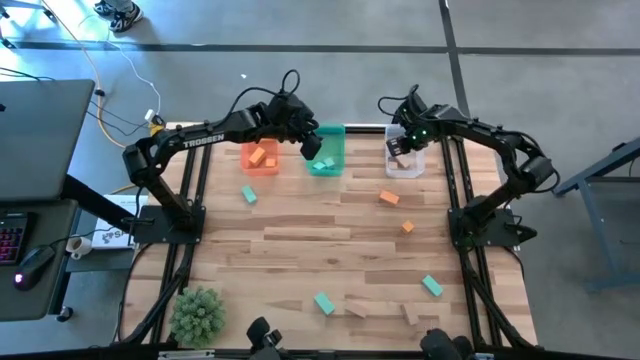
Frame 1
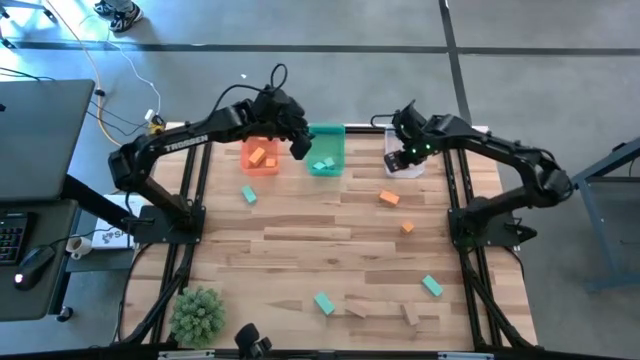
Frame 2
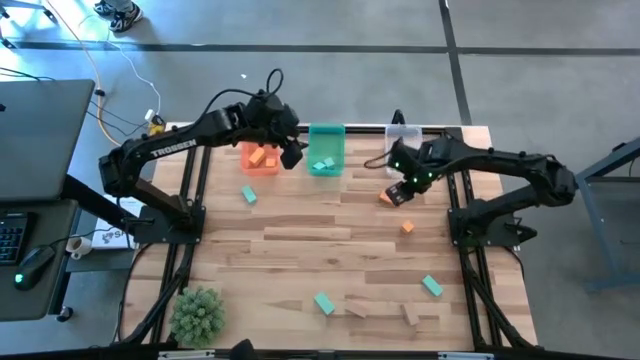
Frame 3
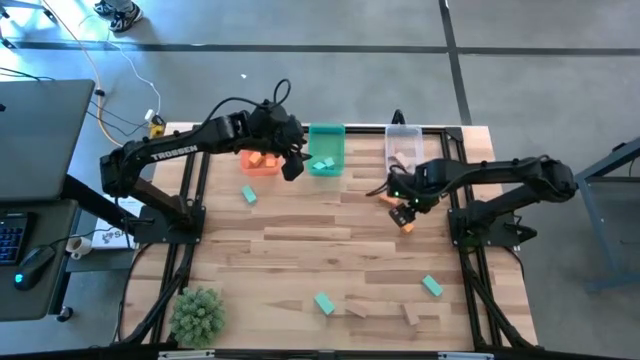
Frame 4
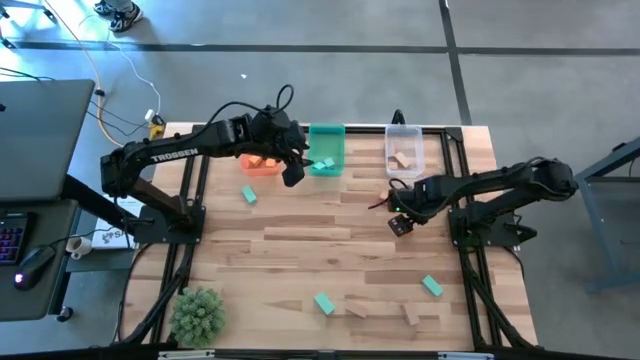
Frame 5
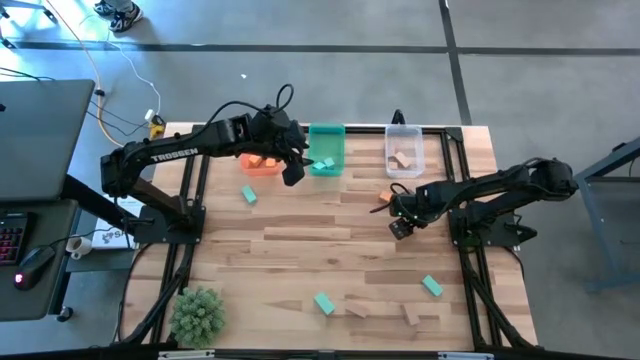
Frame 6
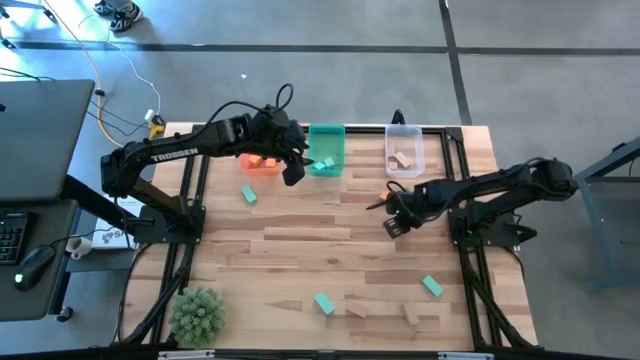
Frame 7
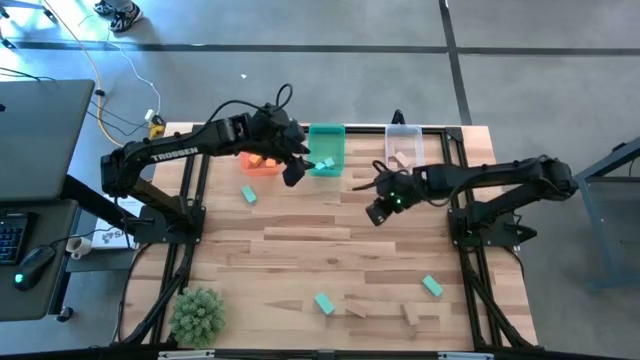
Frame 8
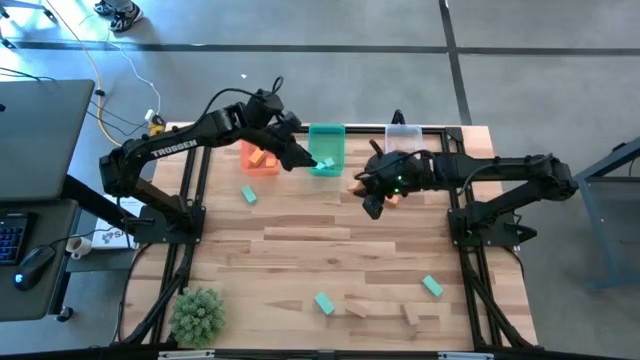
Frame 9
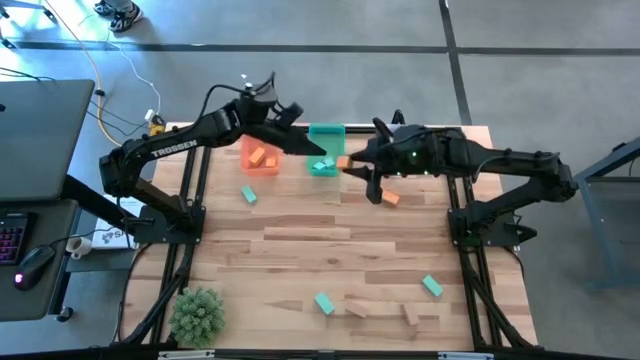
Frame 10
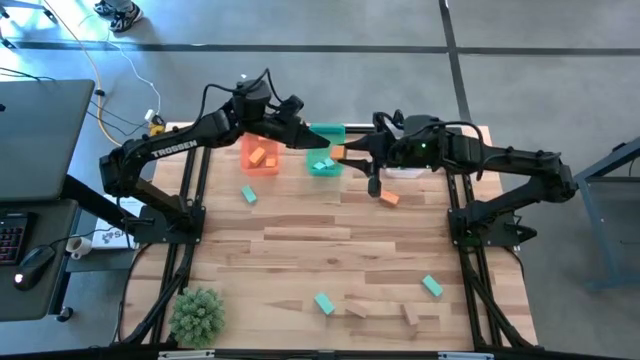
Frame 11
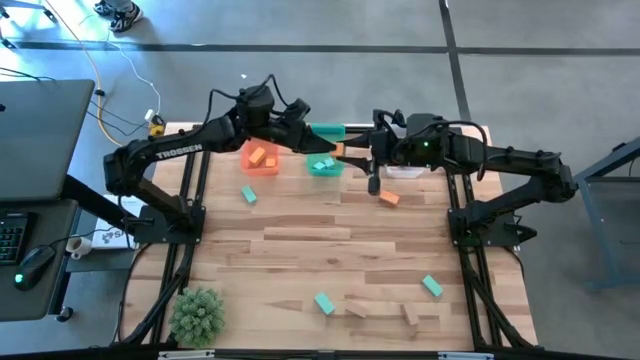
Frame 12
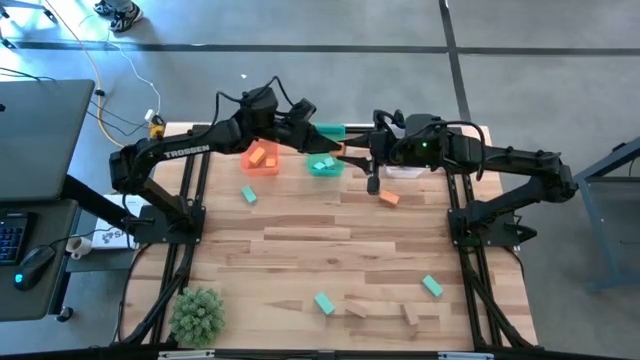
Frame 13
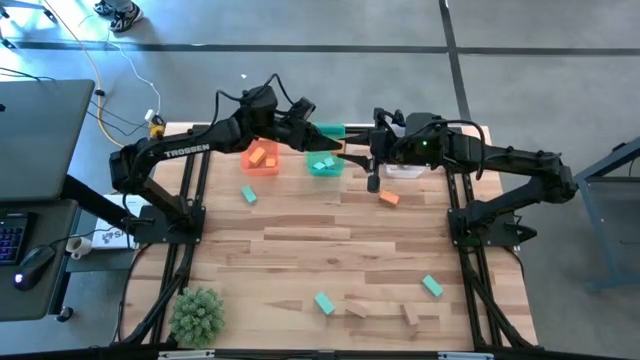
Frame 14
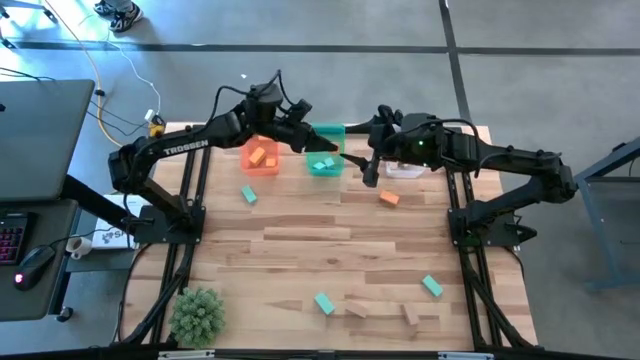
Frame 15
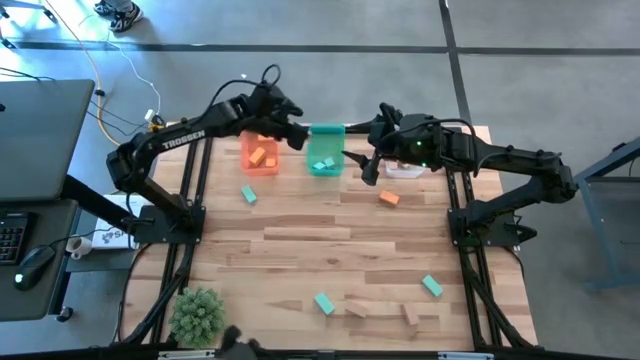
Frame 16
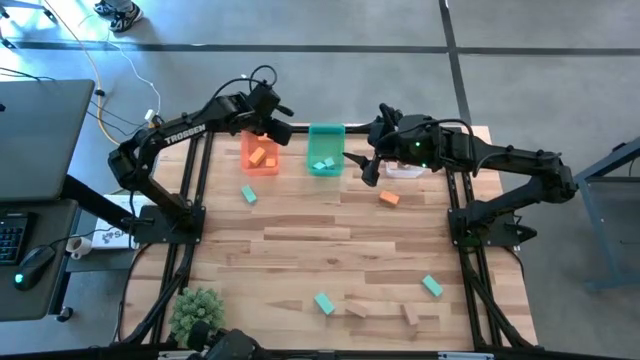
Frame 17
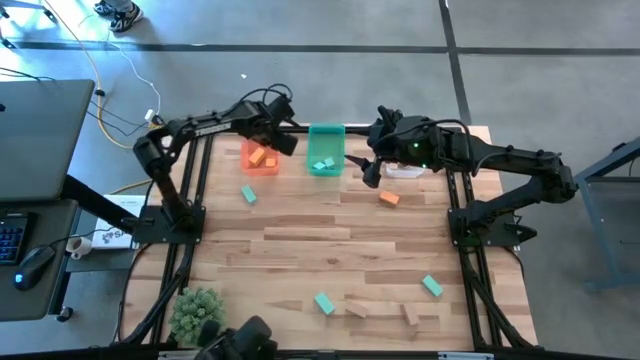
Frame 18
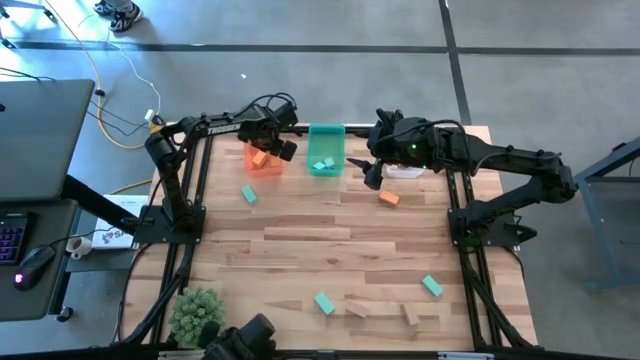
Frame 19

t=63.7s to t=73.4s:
Task: Sort & place blocks by color
Put the orange block into the orange bin

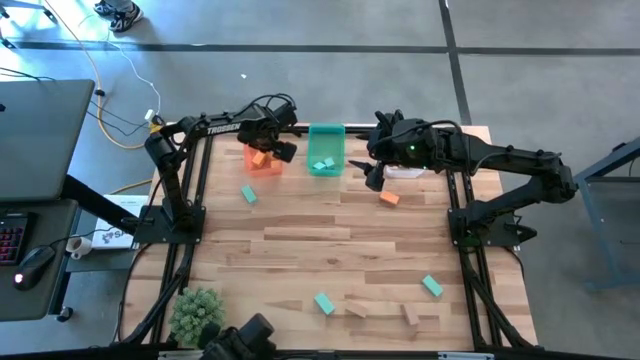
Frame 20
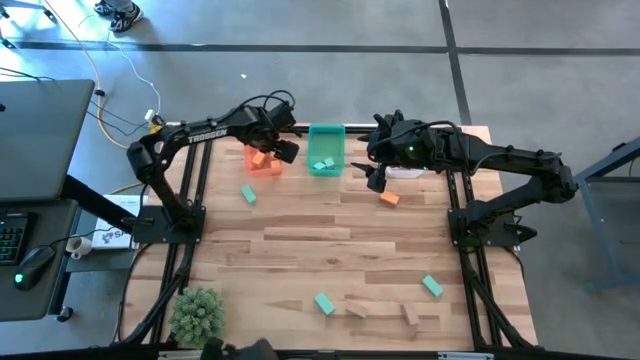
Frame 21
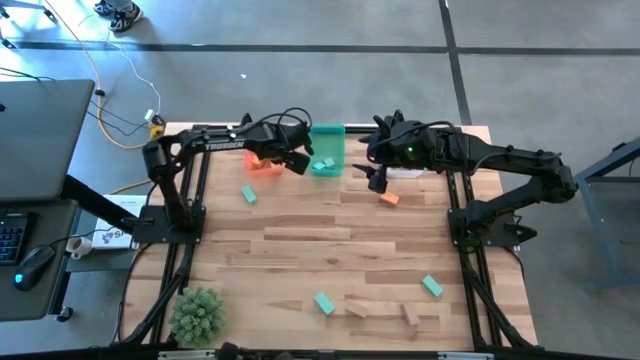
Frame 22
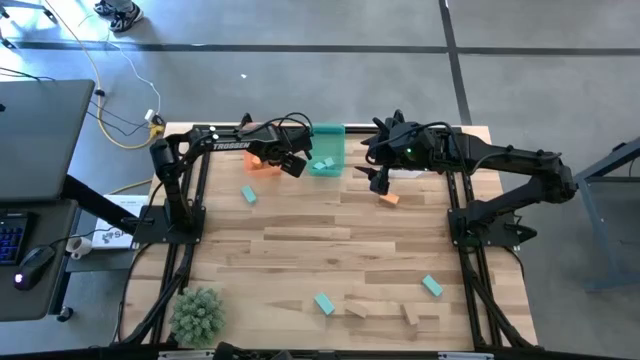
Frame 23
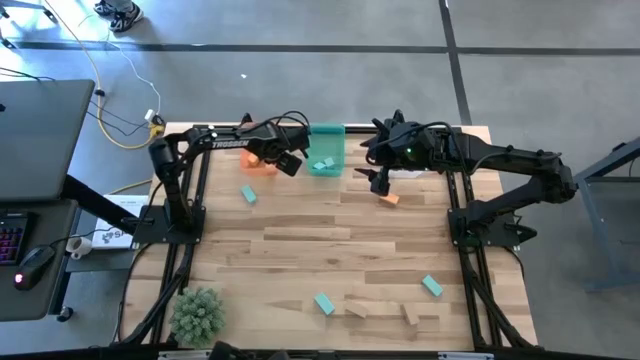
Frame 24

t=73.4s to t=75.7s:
Adjust the orange bin

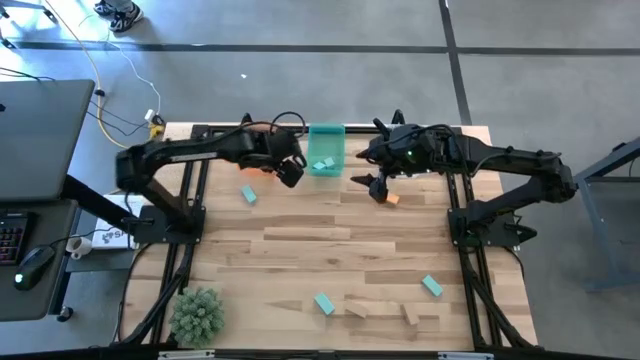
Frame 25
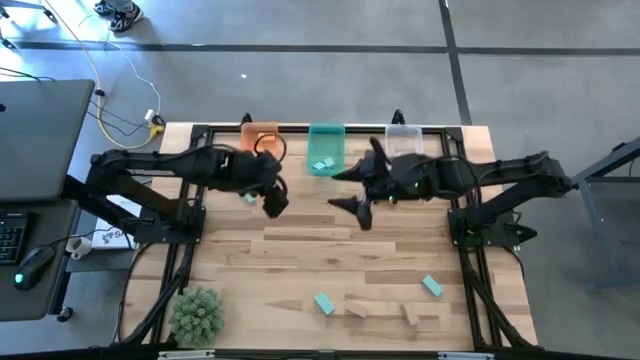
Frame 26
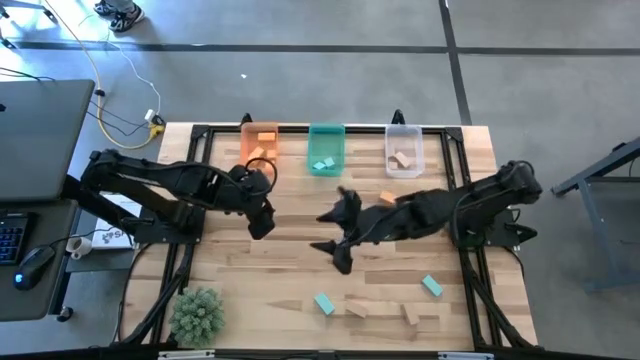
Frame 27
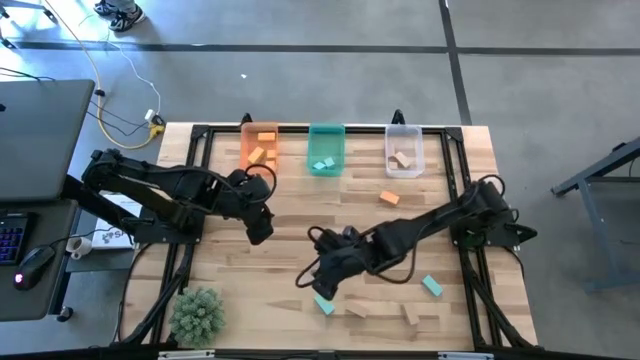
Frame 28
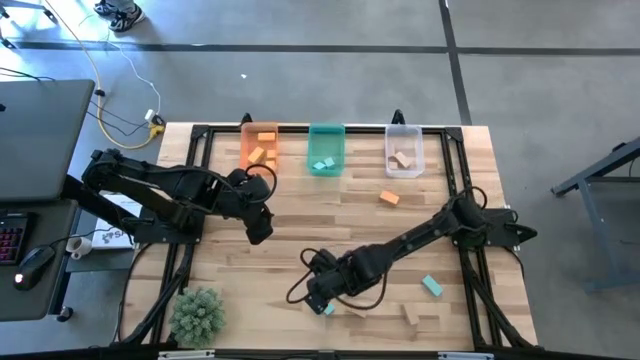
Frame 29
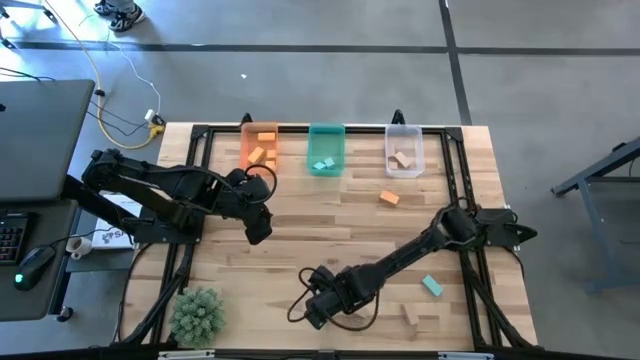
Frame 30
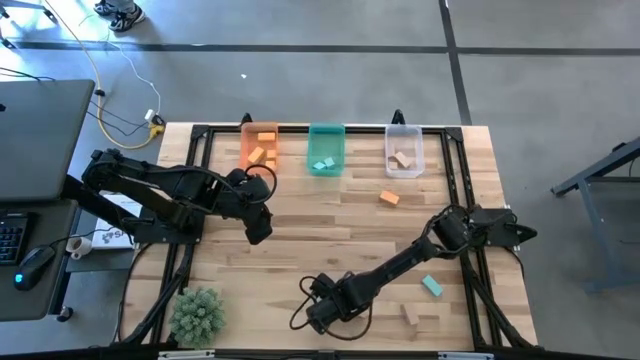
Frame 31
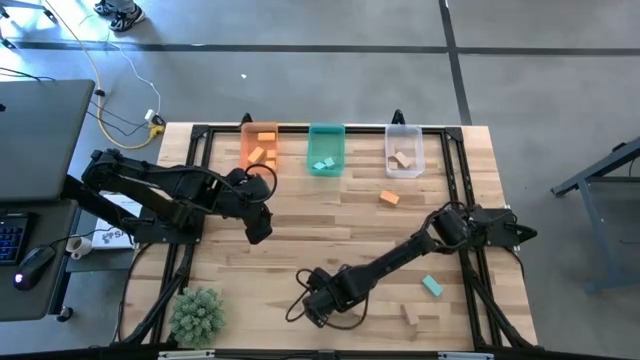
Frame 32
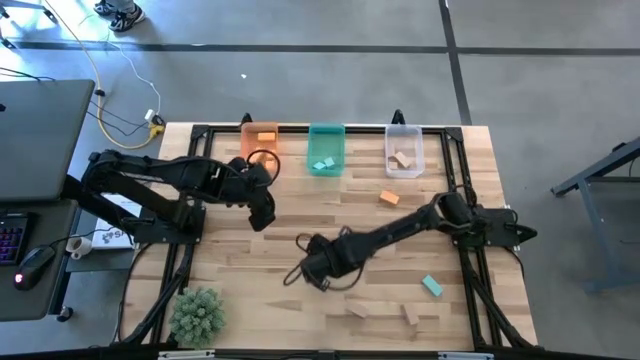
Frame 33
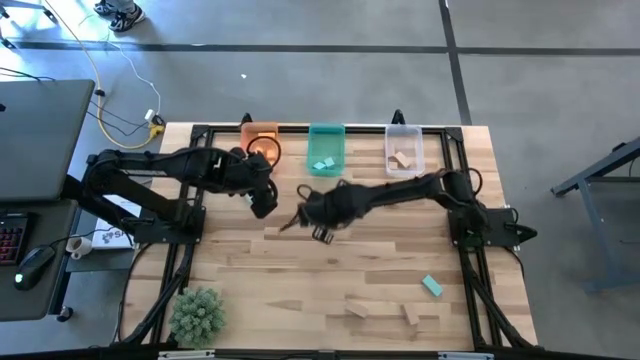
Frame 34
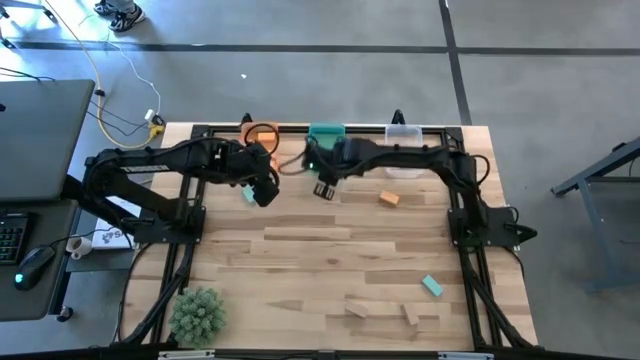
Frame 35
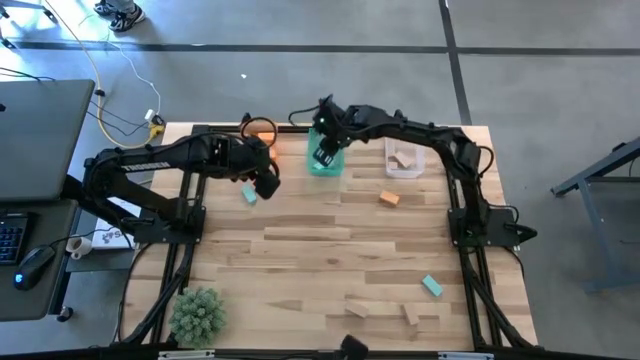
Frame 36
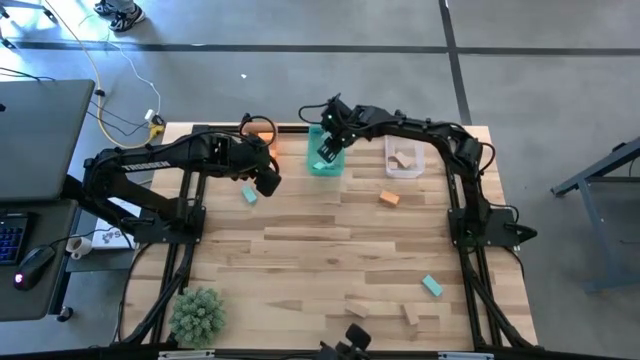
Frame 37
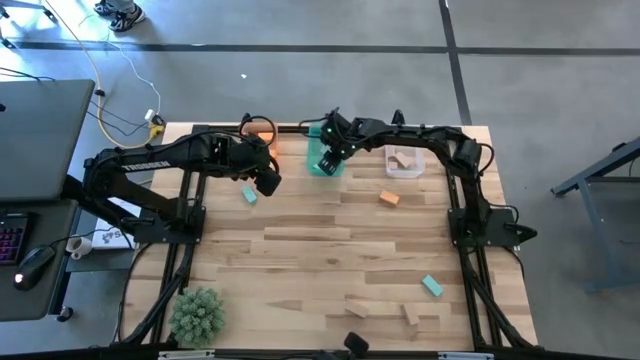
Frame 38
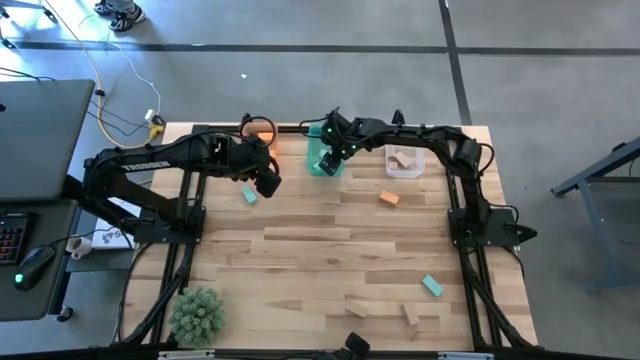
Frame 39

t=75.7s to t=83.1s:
Put the blue block into the green bin

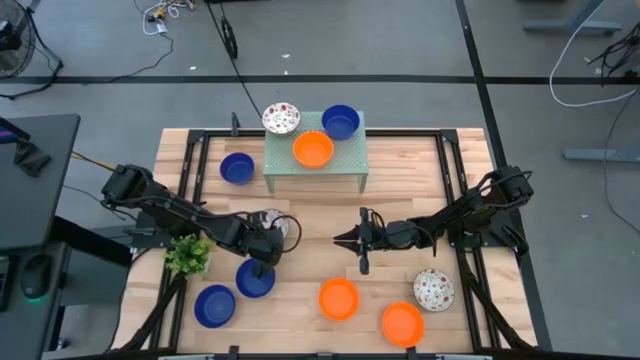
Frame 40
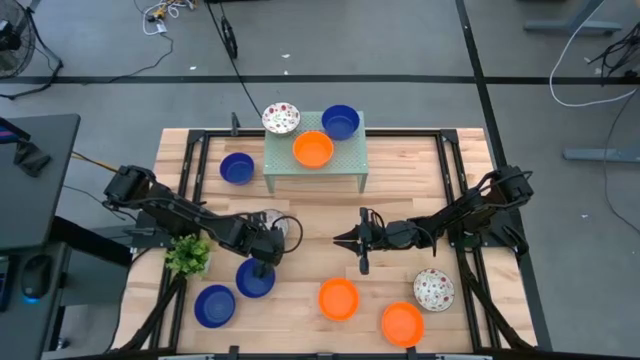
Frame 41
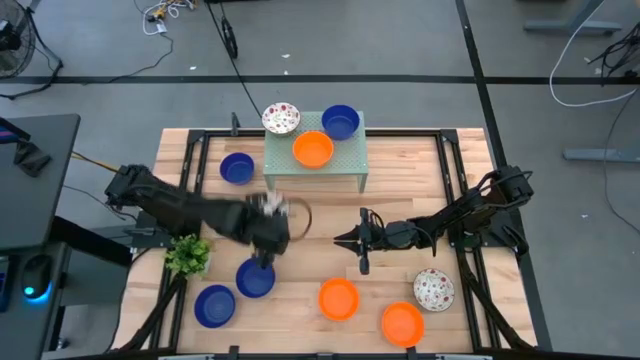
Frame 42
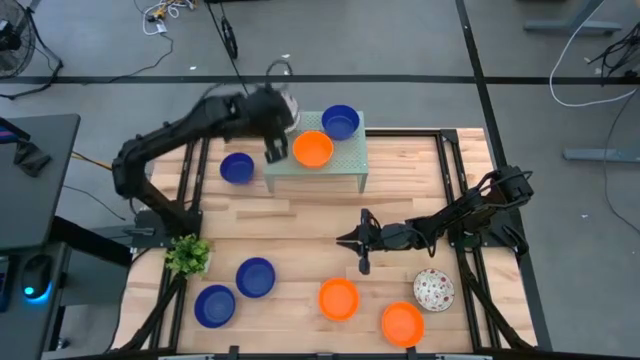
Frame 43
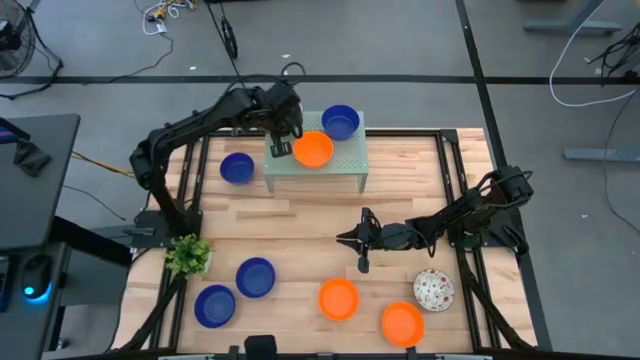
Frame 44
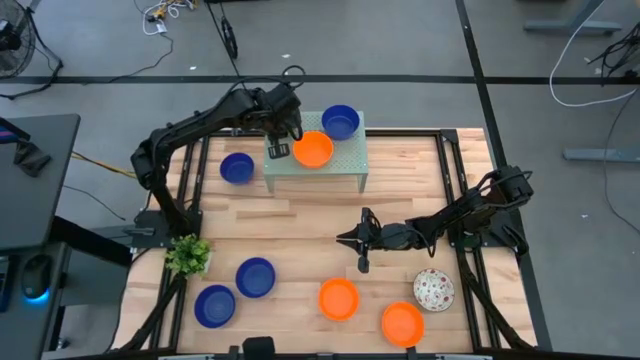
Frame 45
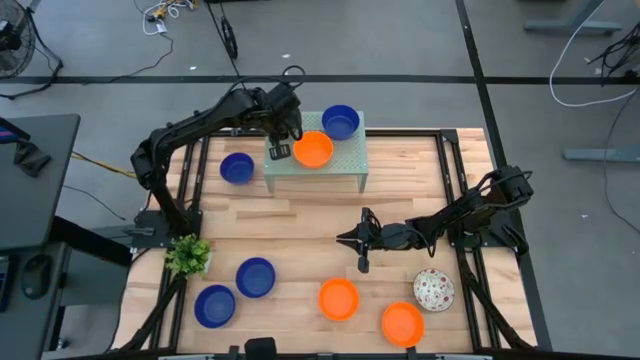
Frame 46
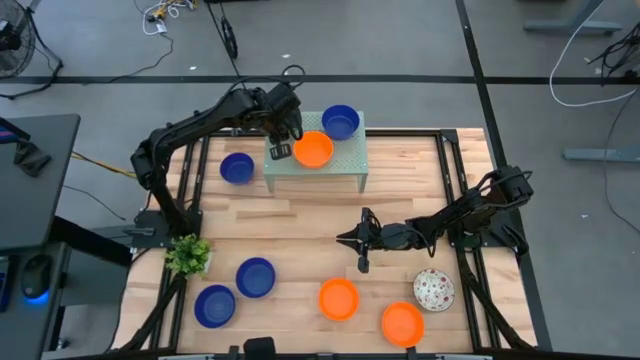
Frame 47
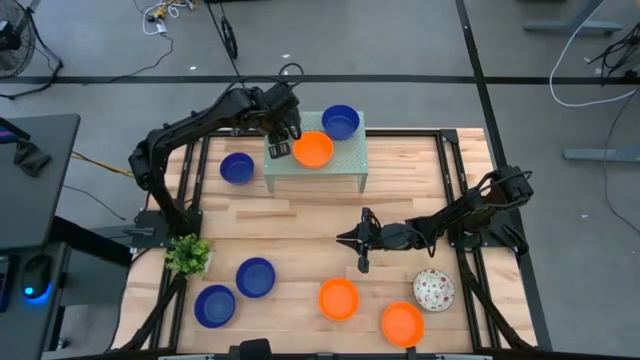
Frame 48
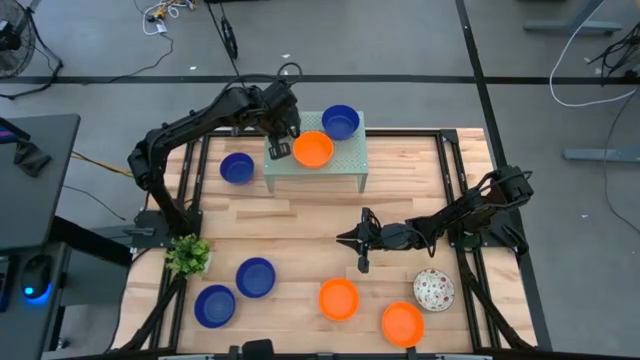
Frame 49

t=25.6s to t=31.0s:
Task: Pick & Place Mini bowls
Stack the white patterned bowl on the white patterned bowl on the shelf
